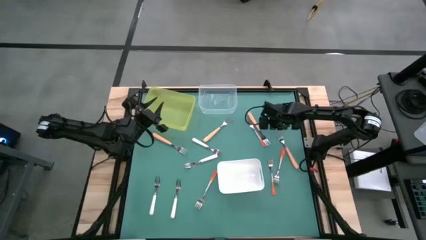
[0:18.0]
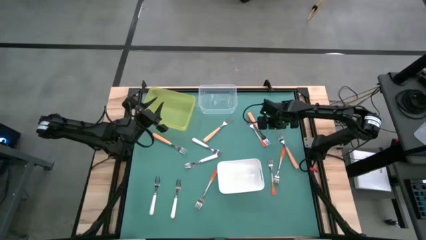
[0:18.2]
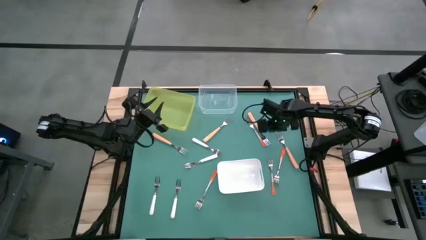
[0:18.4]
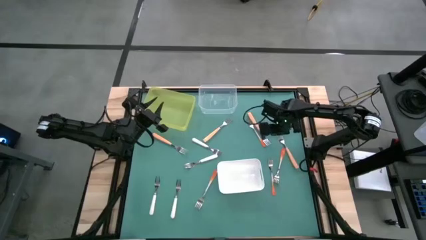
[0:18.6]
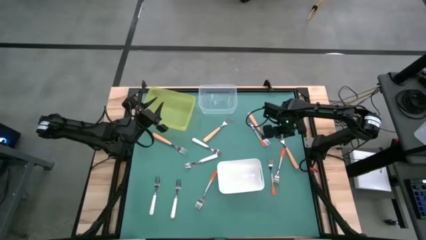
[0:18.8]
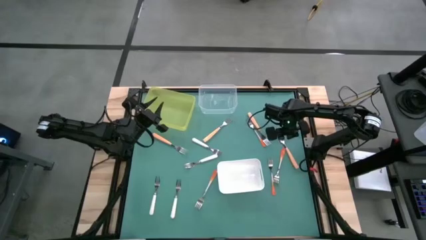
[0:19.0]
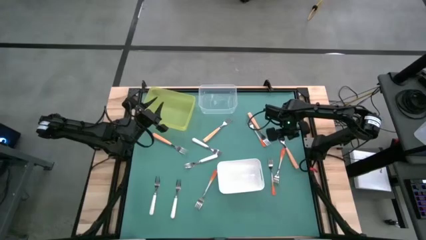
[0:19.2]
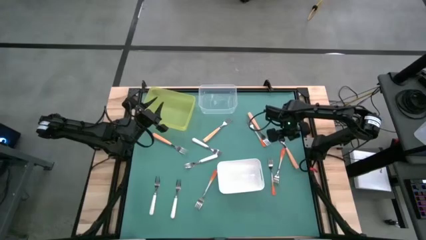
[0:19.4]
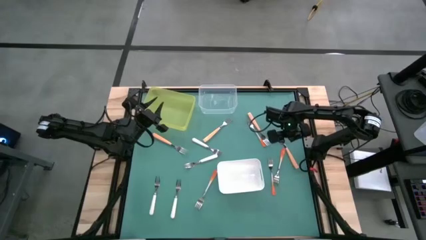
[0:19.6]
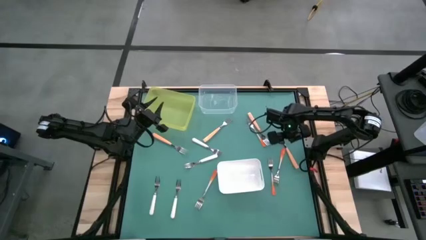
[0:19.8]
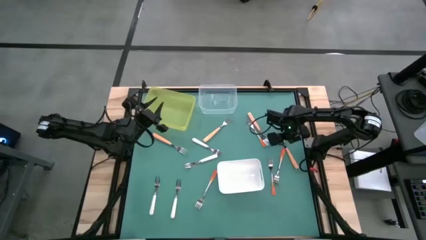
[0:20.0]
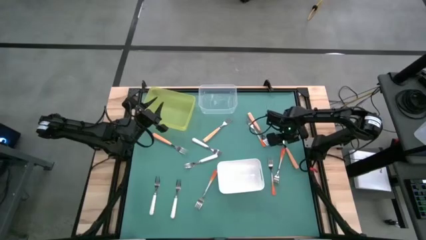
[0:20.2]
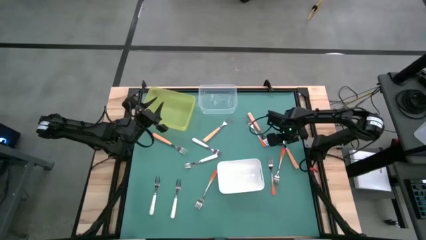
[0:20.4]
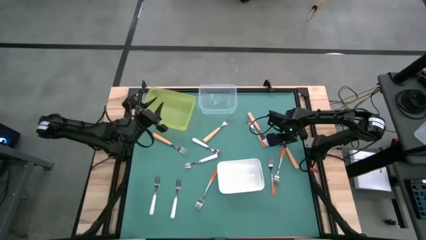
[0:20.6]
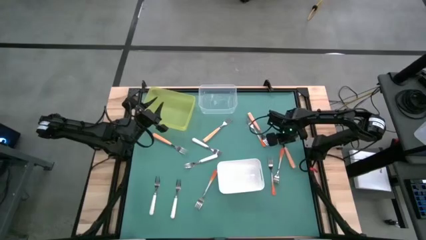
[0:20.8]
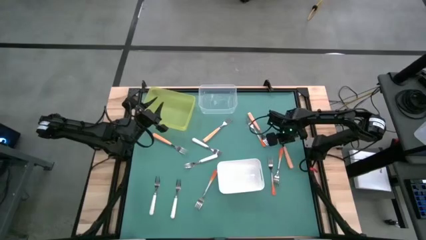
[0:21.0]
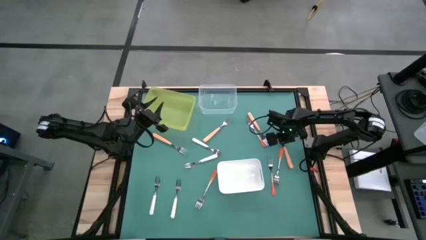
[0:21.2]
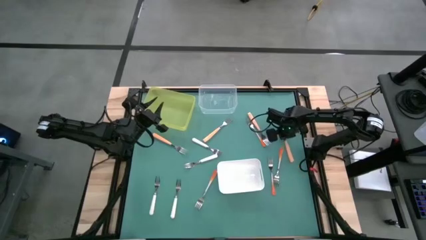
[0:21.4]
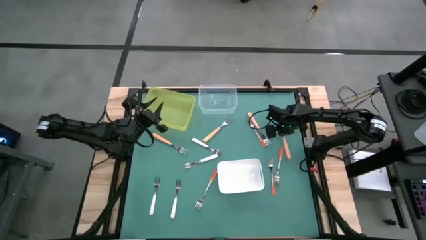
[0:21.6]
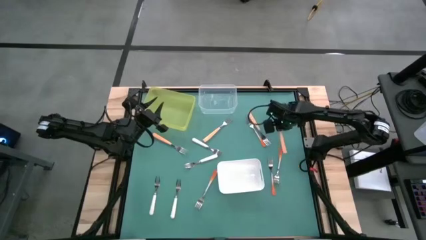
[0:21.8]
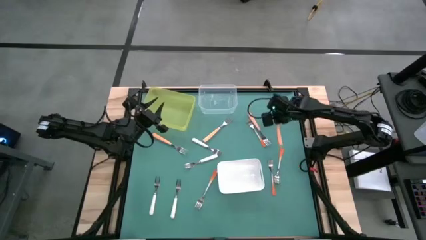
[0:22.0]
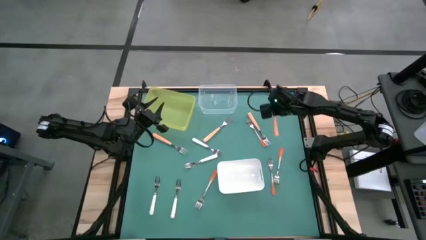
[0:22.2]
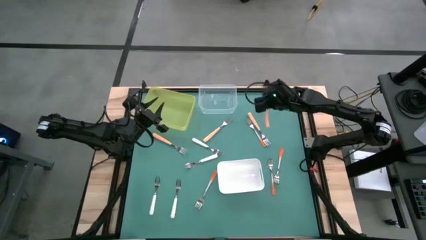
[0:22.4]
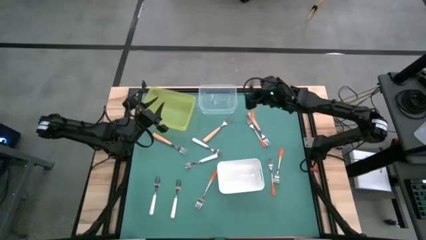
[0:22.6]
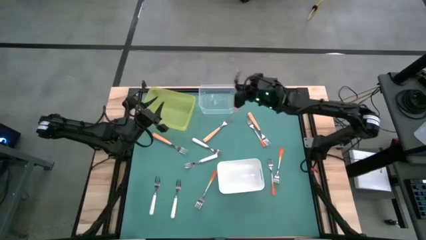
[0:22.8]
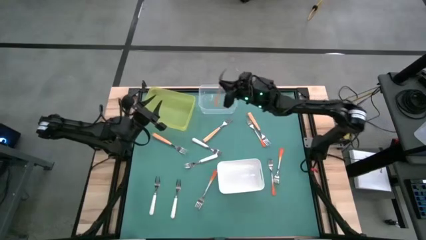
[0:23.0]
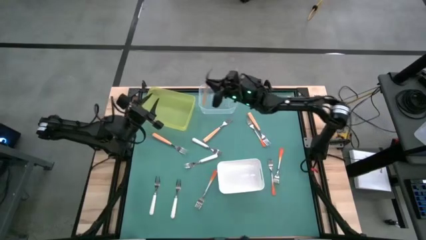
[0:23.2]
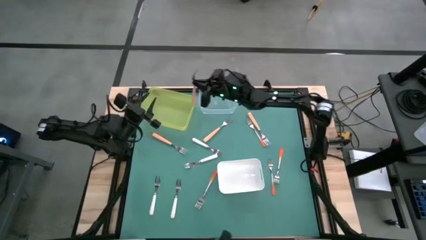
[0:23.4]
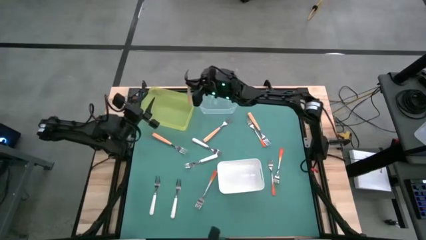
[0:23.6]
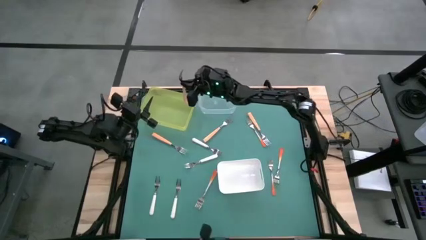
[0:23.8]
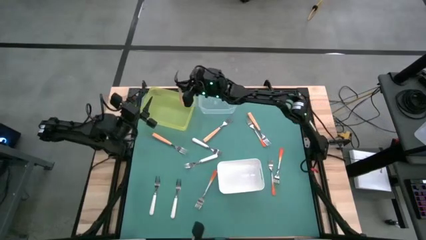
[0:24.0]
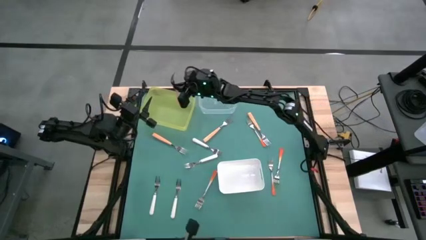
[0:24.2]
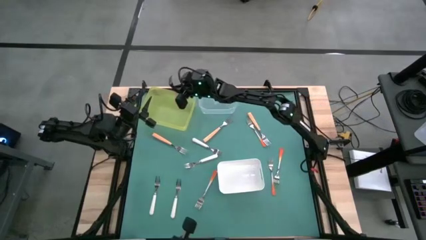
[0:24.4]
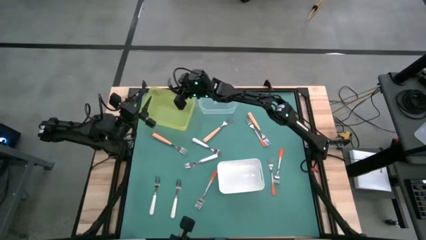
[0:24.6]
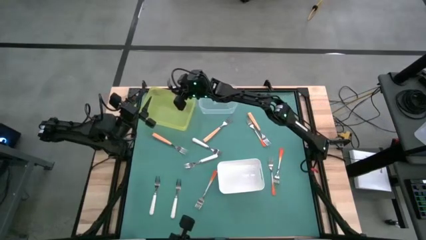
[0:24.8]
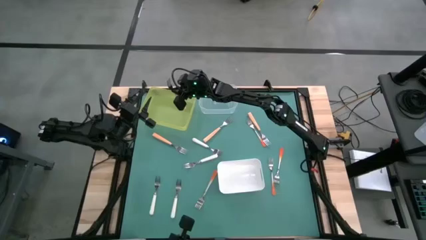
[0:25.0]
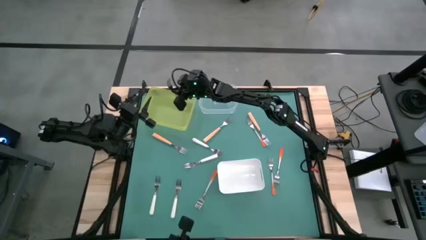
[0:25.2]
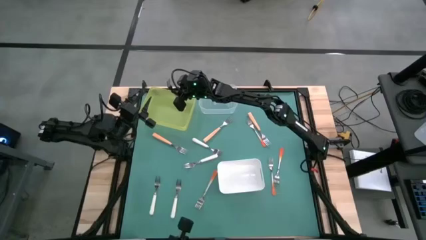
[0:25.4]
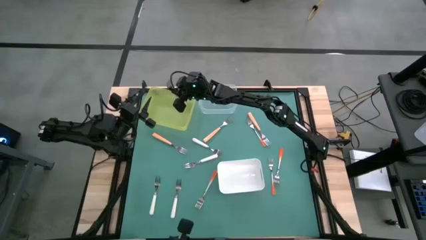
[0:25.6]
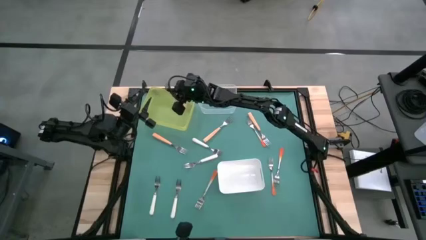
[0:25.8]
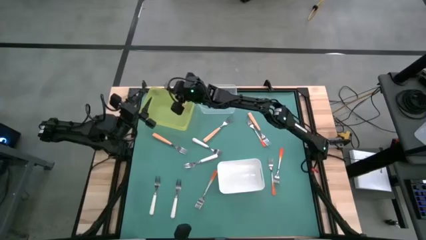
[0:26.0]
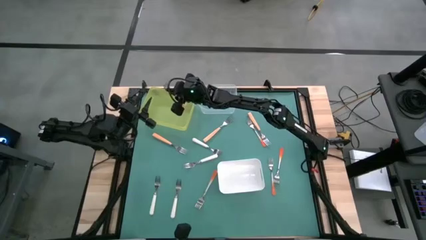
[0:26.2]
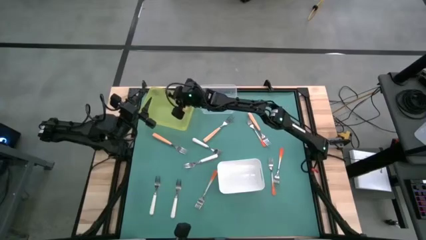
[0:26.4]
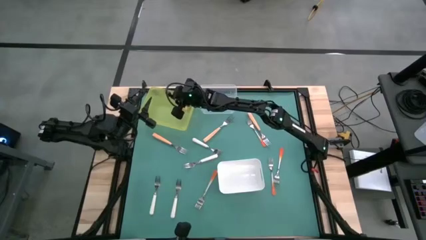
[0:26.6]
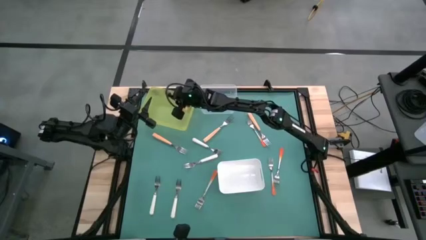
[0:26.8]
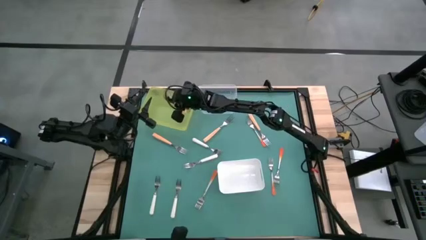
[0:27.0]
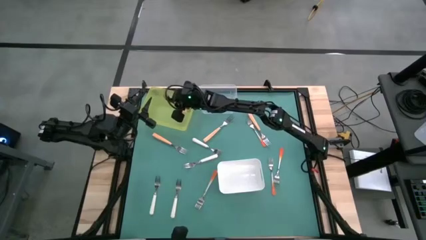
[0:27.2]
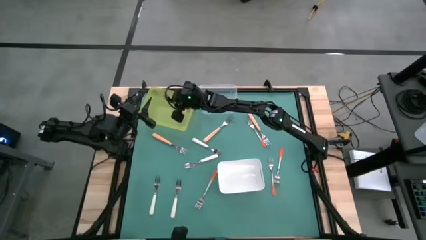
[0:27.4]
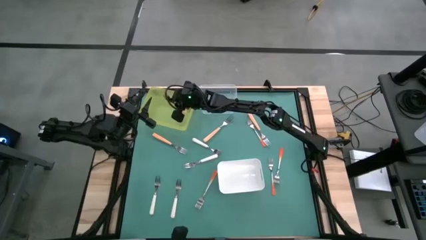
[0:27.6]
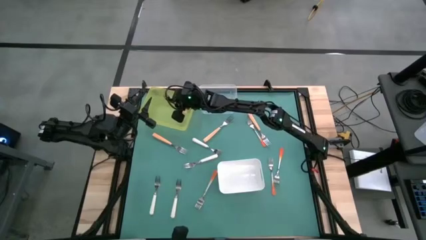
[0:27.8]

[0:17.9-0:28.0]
Task: Sort silverware by color (type)
Put the light orange into the yellow bin

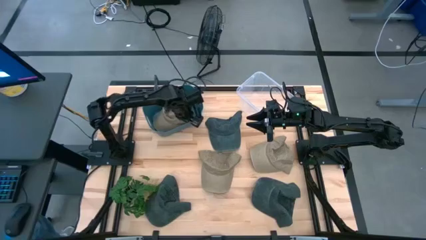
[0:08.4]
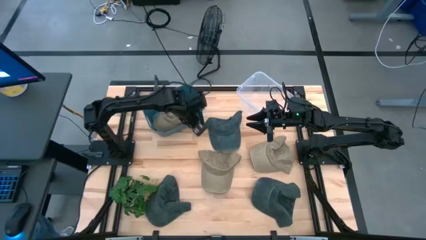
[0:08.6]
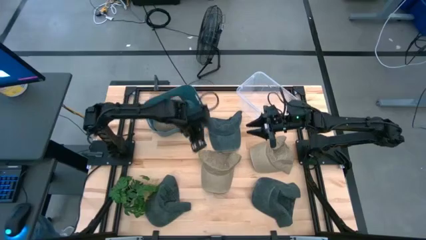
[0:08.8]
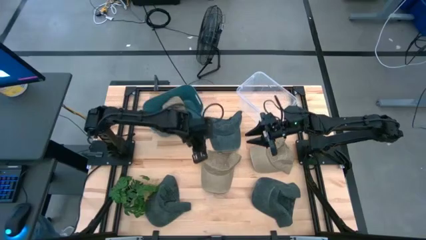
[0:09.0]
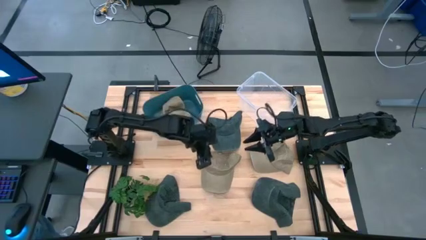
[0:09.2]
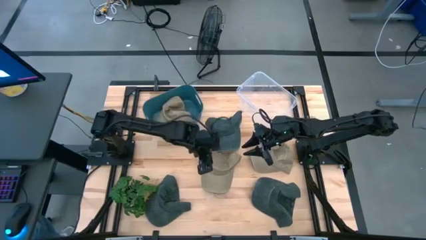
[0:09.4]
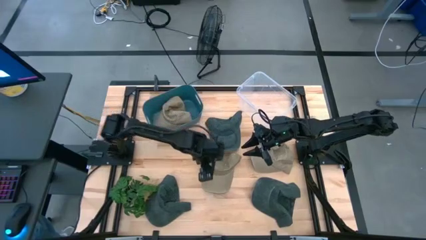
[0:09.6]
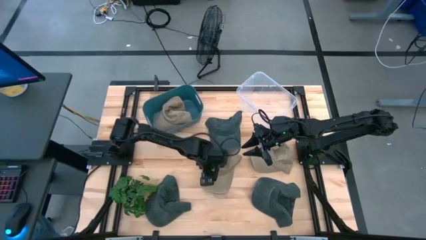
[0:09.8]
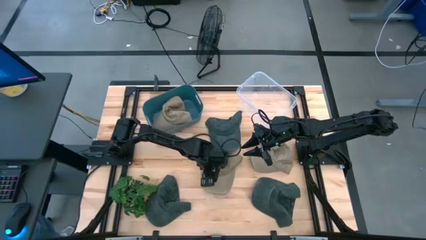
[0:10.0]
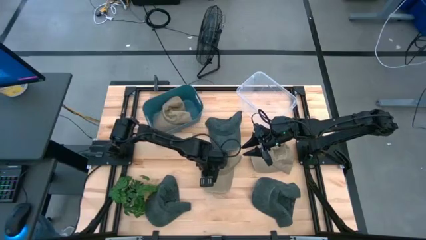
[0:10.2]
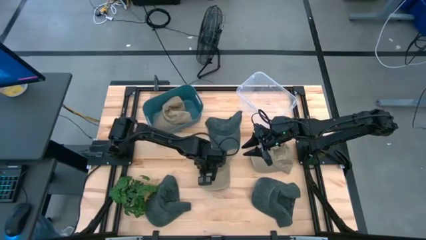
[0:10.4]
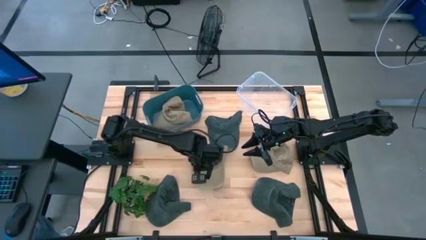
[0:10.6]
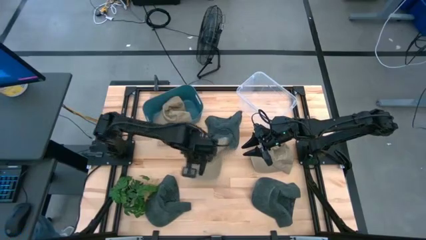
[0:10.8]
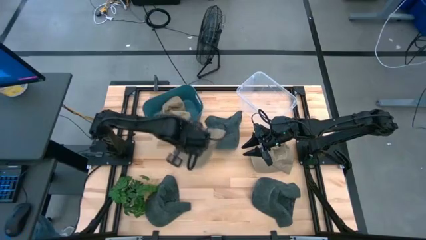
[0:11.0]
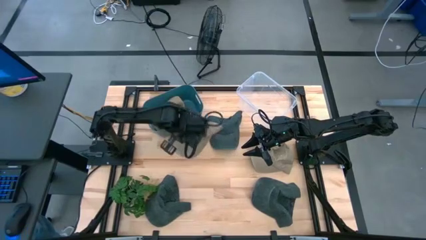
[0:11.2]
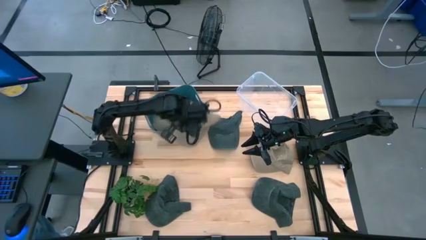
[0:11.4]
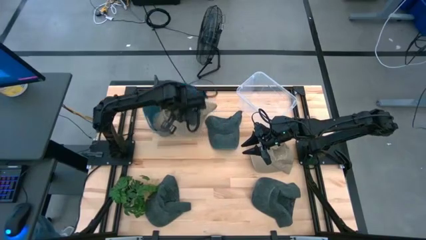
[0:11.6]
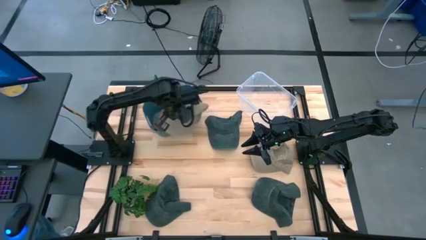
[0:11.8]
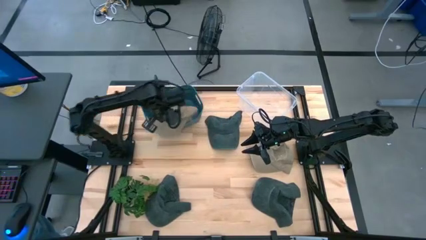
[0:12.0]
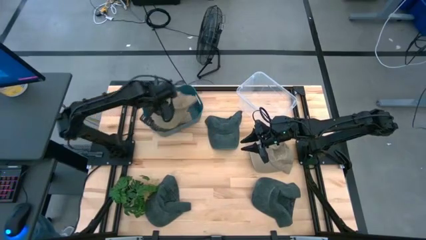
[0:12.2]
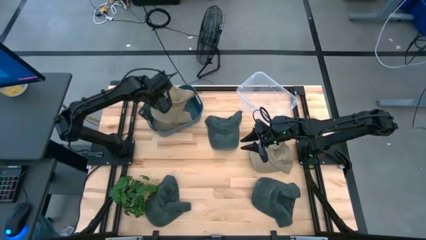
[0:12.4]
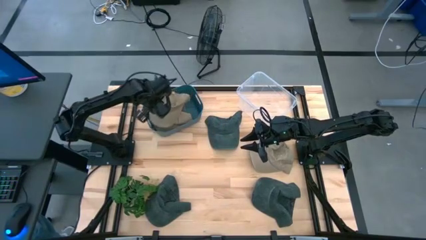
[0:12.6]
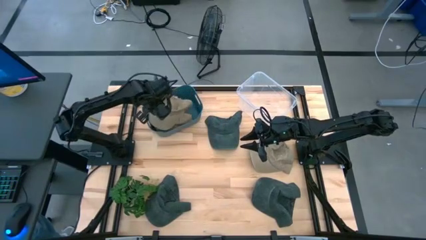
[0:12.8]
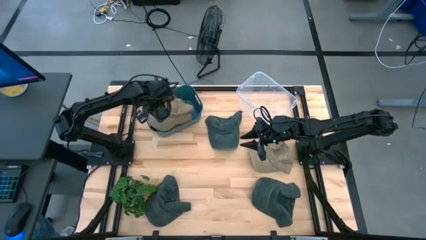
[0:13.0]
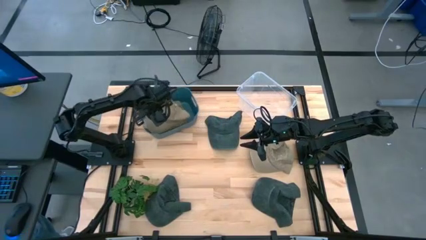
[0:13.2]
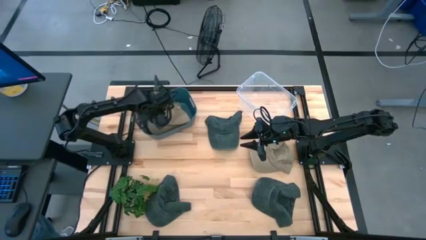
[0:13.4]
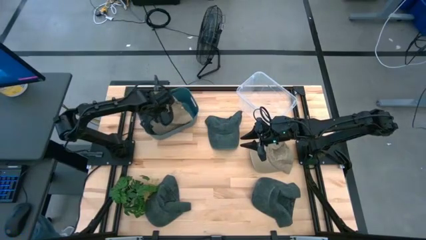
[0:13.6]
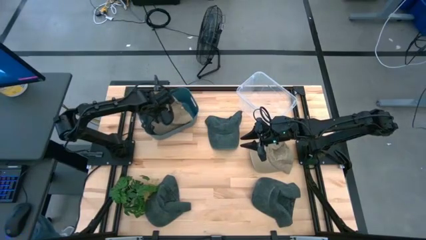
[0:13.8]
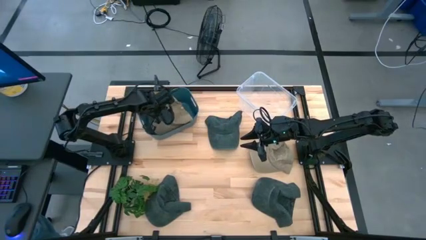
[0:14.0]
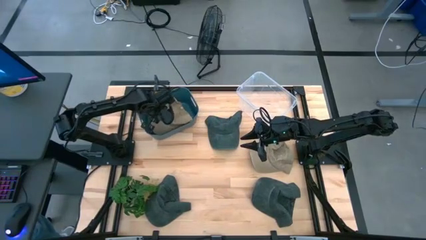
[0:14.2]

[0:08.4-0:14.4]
Task: Pick & Place hat
Put the left brown cap into the blue bin
